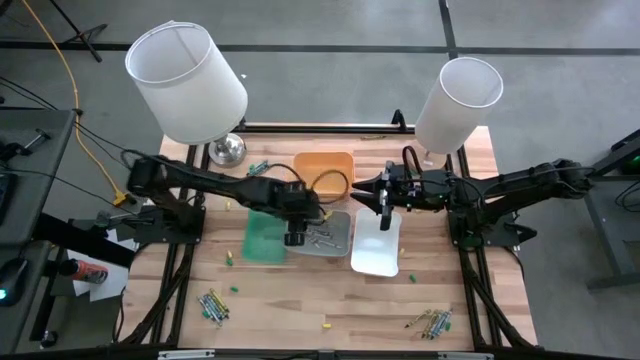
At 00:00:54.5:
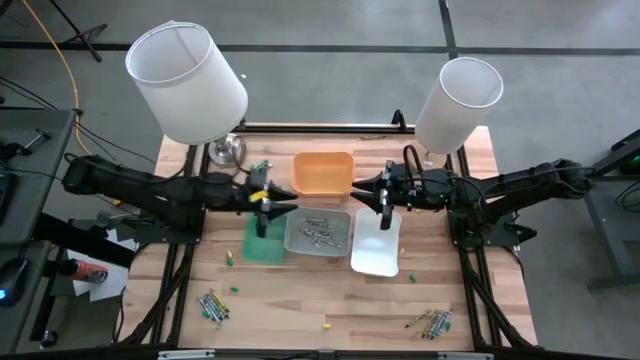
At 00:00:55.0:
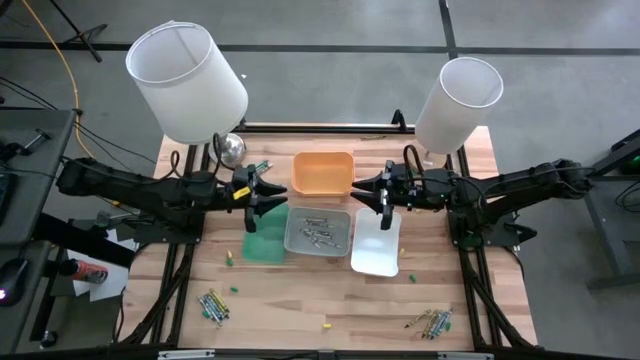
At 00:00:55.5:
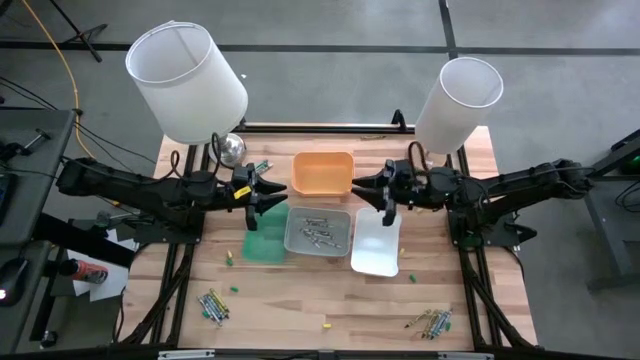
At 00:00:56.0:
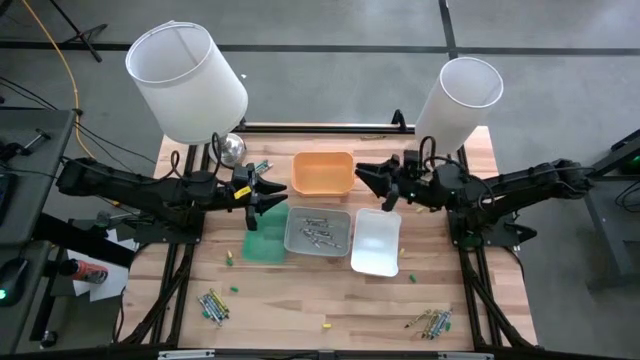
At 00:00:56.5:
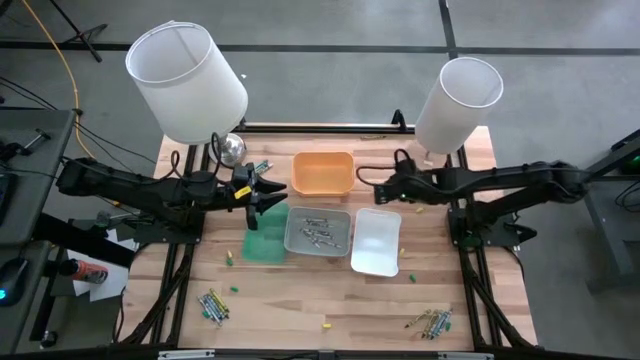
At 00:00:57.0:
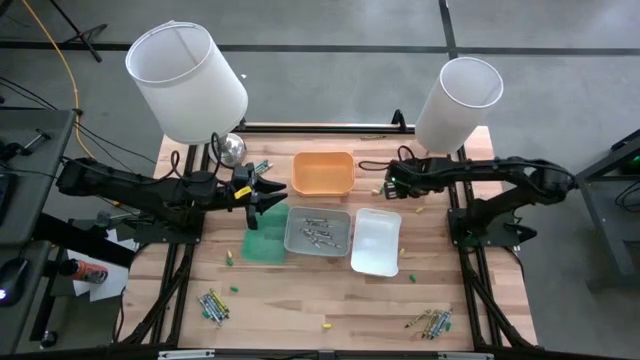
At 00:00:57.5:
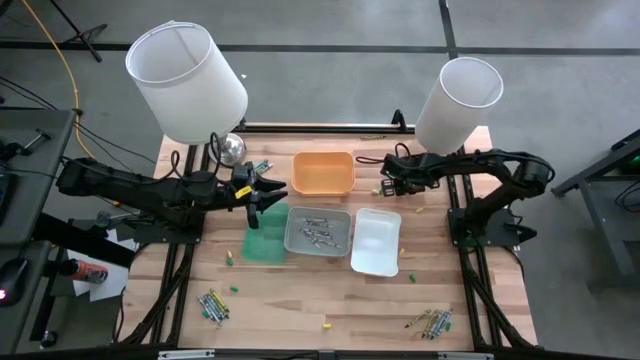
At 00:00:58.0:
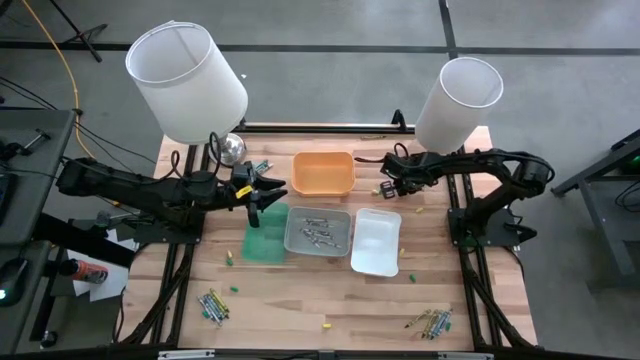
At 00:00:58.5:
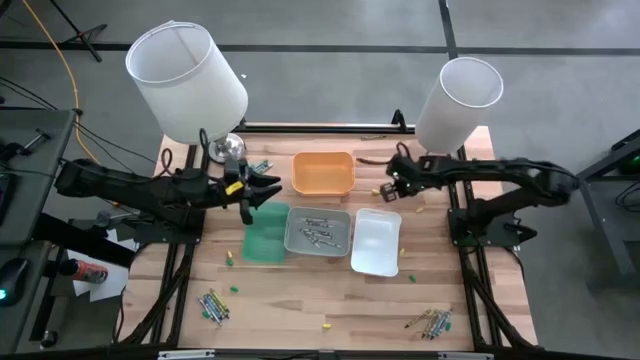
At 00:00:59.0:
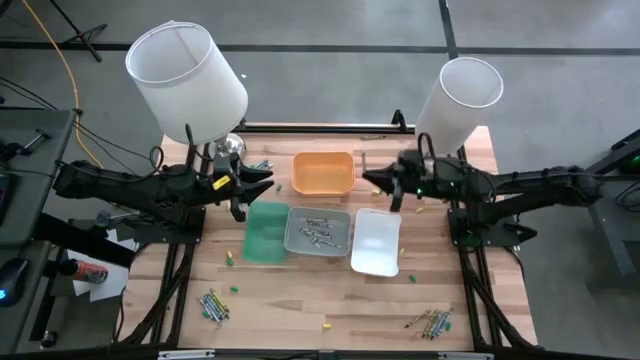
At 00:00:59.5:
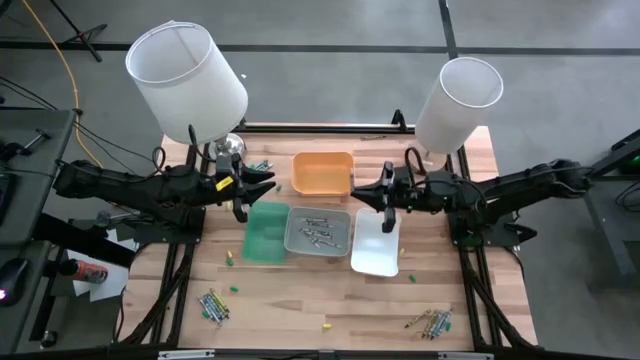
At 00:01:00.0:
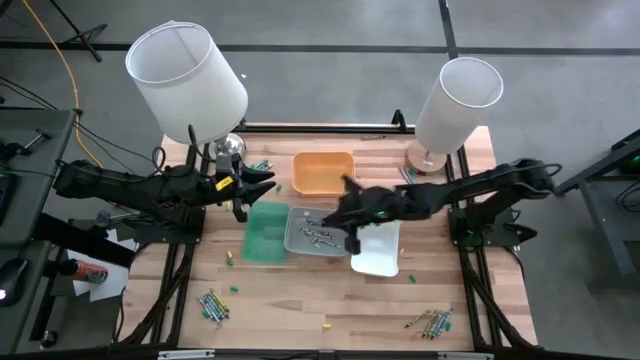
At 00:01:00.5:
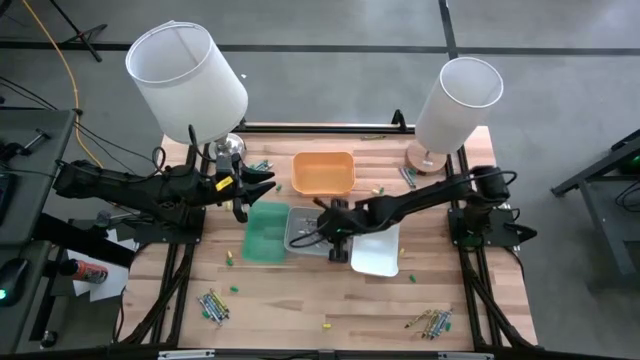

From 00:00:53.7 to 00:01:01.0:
Task: Sort crayons
Put the white crayon into the gray bin

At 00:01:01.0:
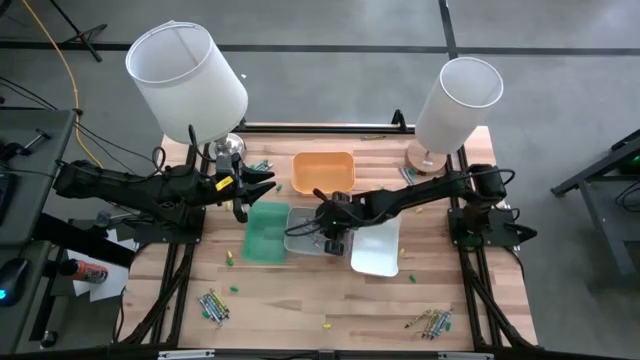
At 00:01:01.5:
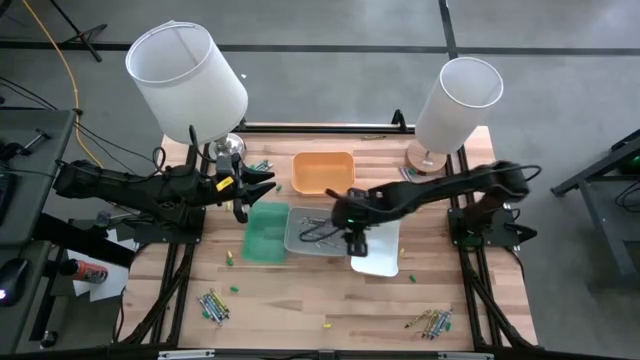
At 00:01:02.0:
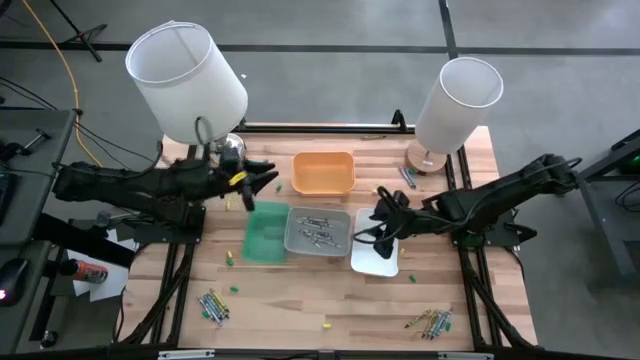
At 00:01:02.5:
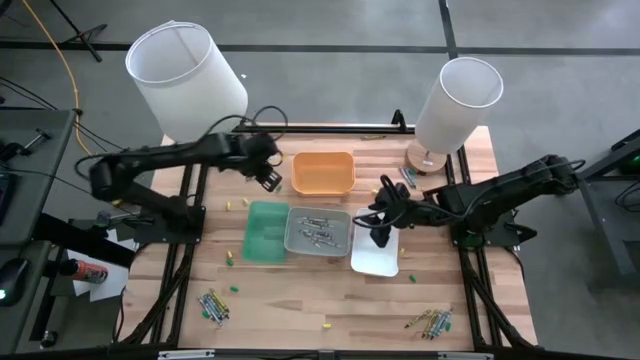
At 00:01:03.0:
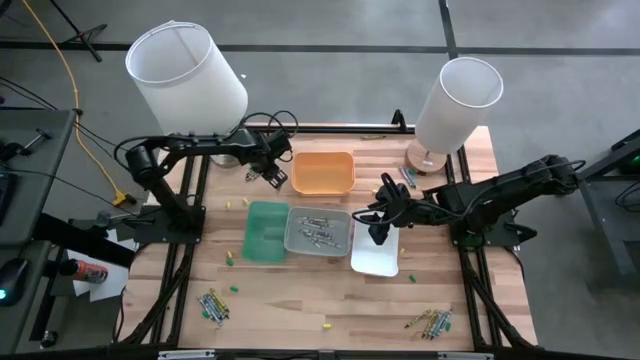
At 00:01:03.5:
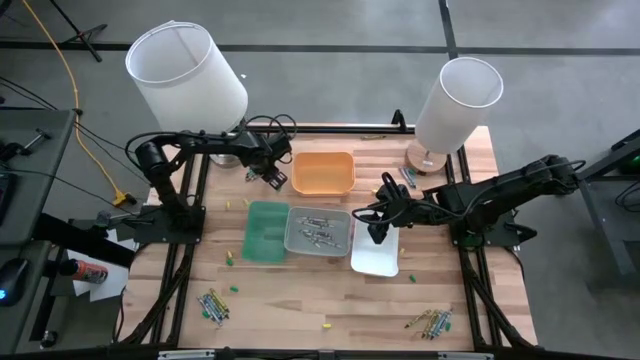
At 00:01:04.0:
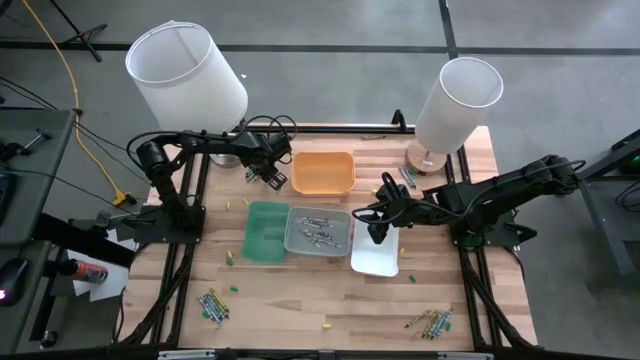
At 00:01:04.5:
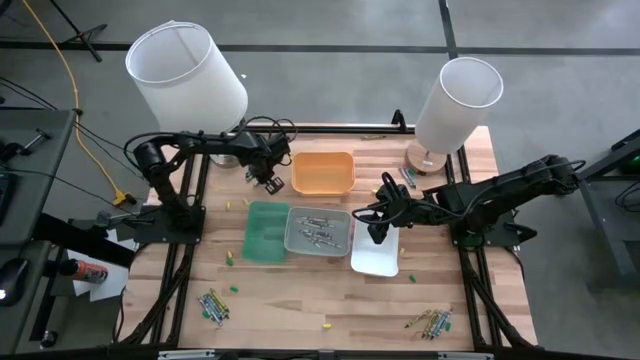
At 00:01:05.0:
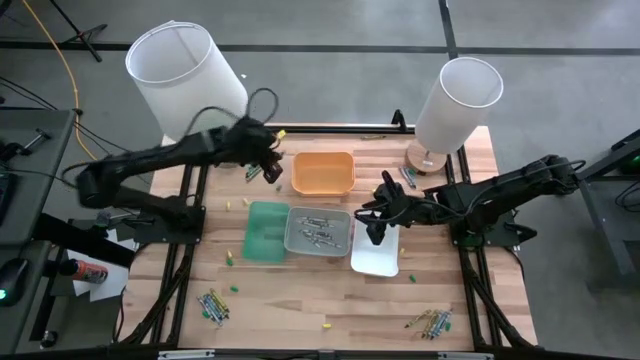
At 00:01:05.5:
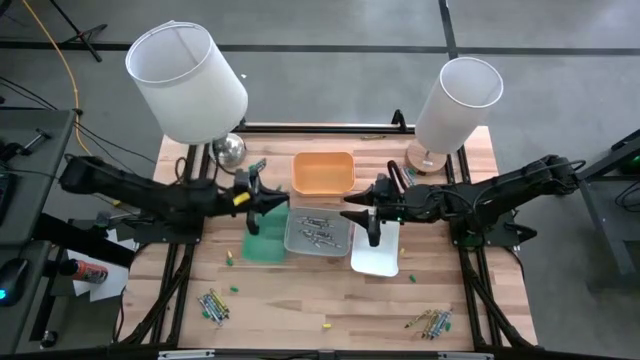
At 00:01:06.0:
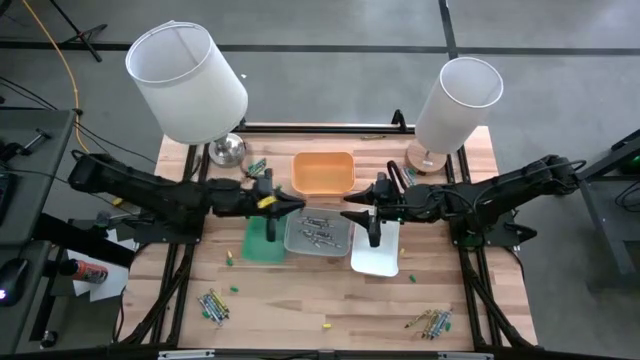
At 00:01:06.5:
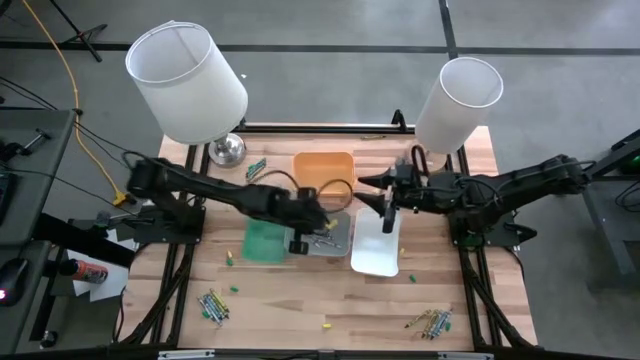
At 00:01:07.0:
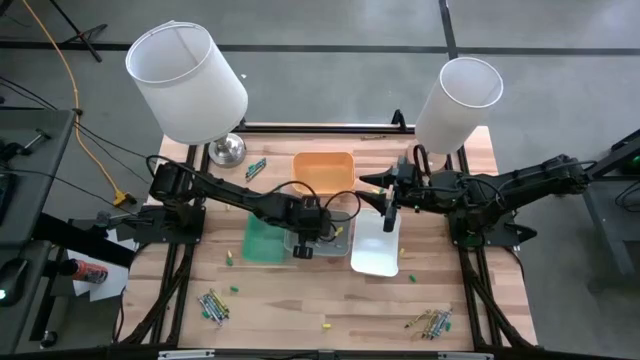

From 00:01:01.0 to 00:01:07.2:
Put the white crayon into the gray bin

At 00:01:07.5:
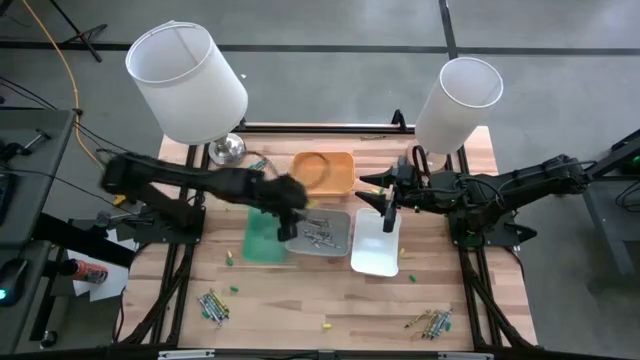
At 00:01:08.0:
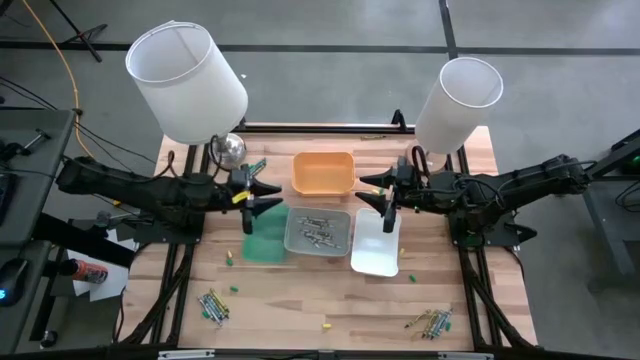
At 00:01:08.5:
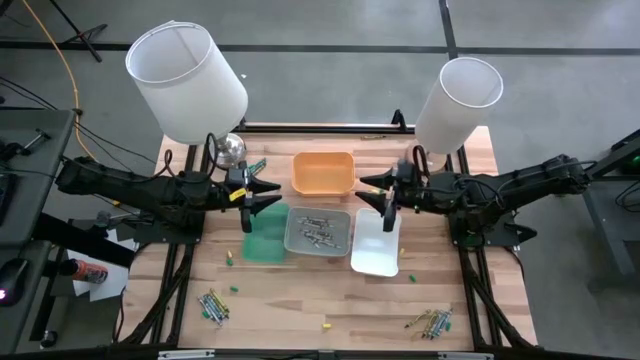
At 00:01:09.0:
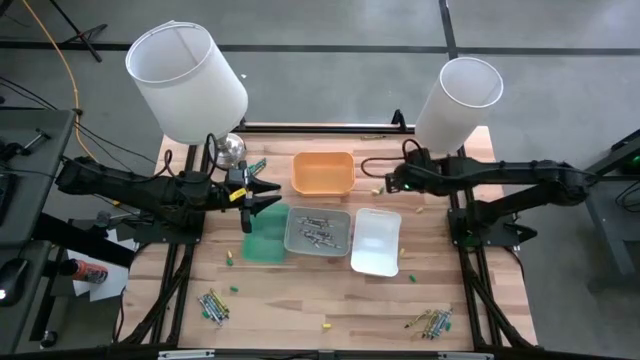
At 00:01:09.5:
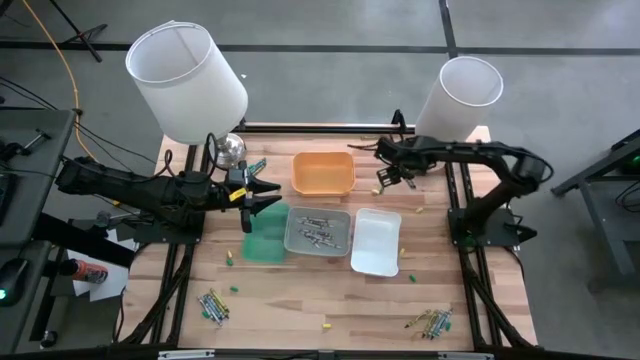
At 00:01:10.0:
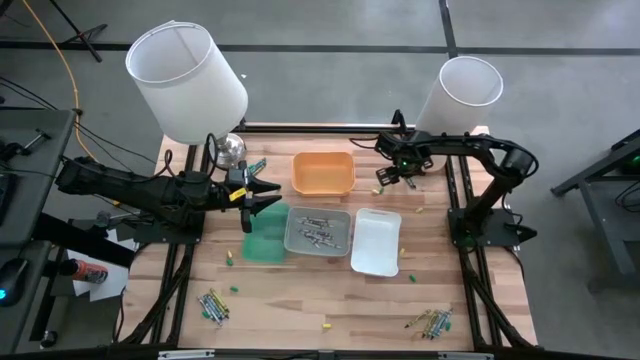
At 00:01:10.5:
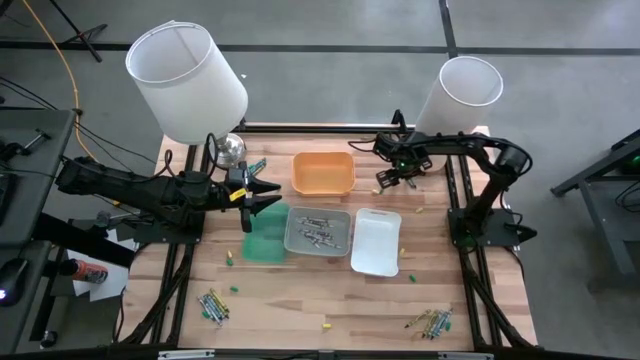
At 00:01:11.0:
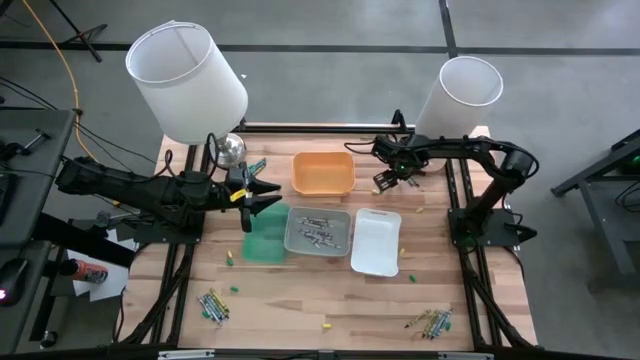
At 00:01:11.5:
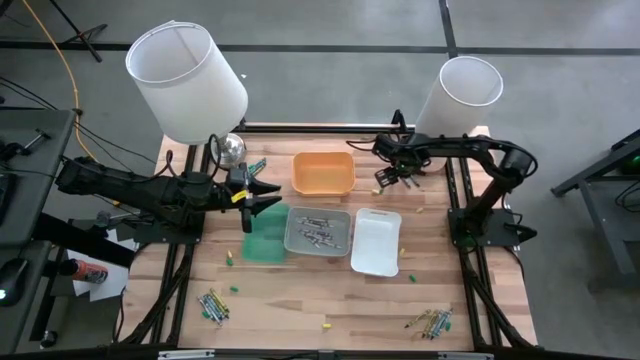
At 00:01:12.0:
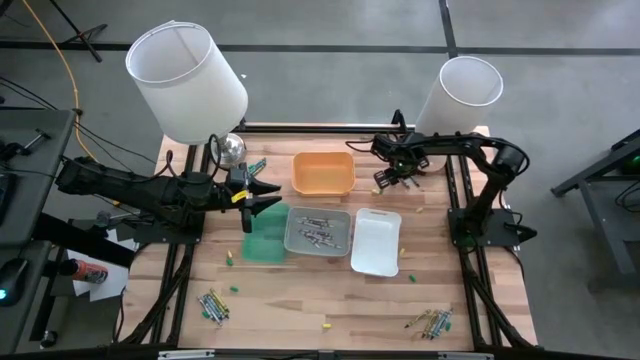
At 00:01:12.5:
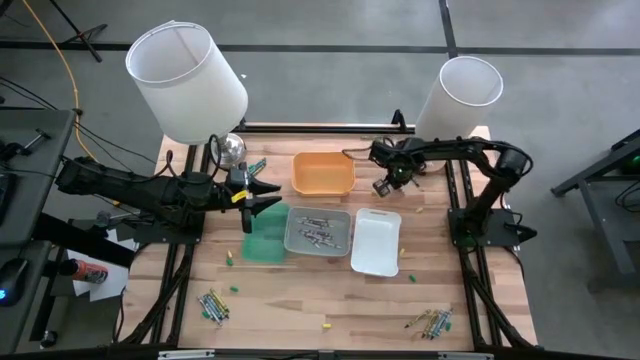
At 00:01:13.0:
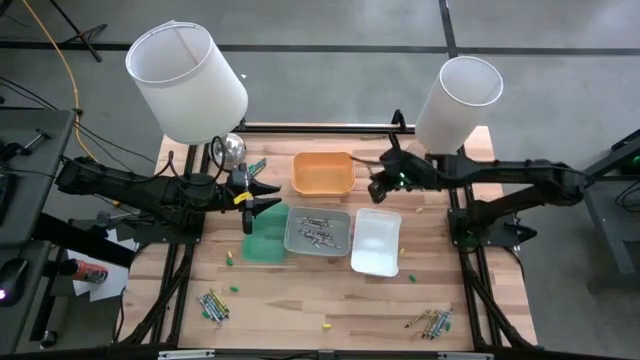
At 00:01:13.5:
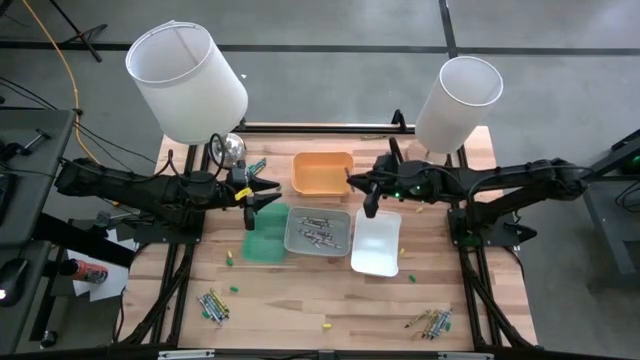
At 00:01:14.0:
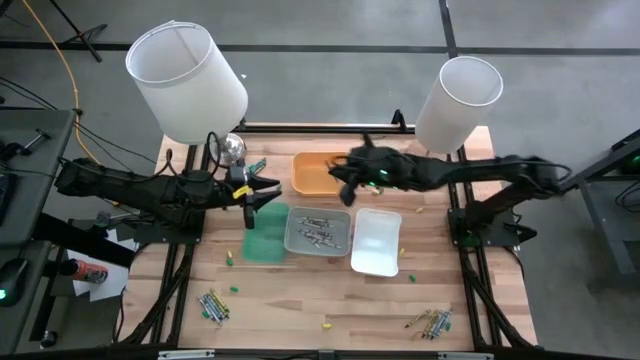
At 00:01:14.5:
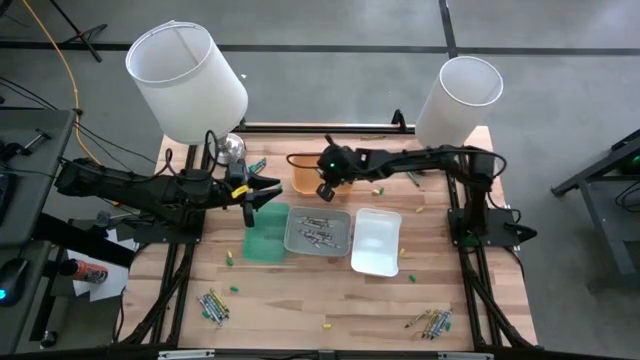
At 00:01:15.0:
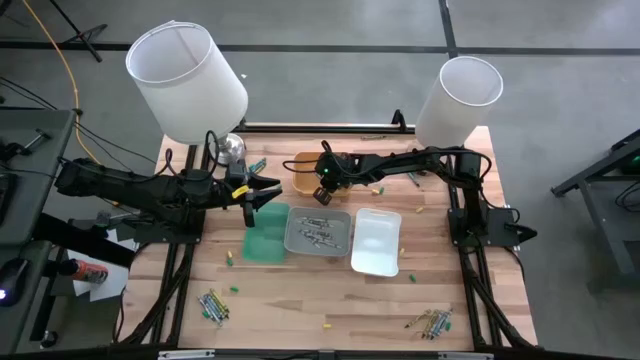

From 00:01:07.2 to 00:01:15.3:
Put the gray crayon into the yellow bin
